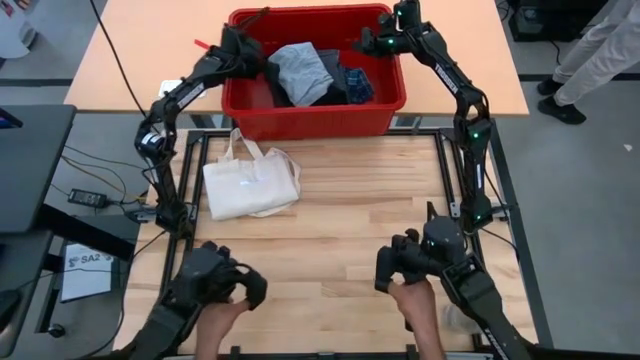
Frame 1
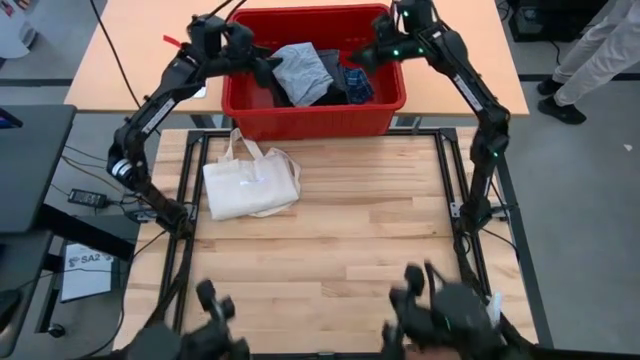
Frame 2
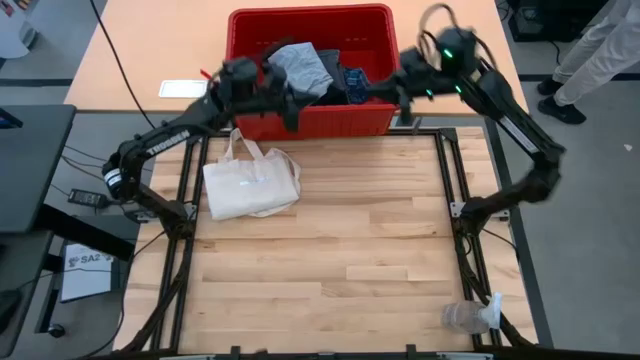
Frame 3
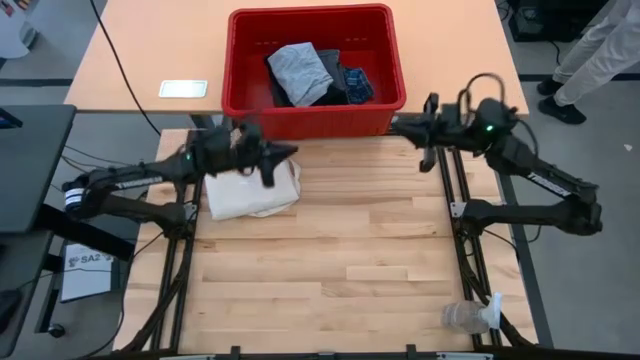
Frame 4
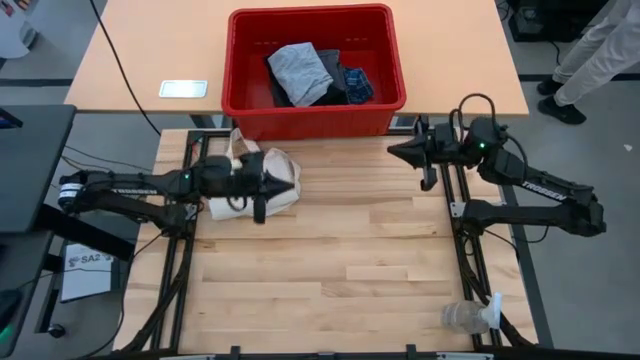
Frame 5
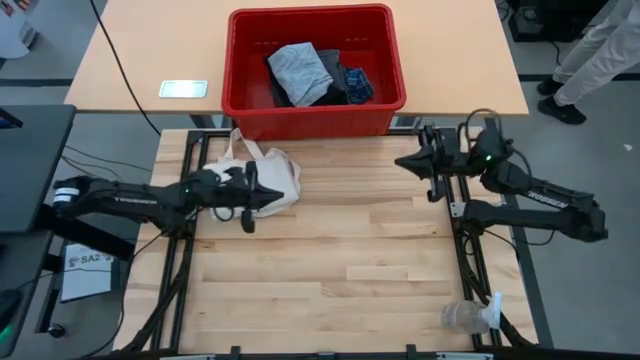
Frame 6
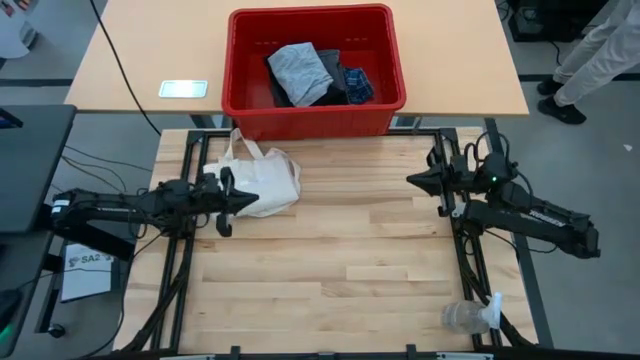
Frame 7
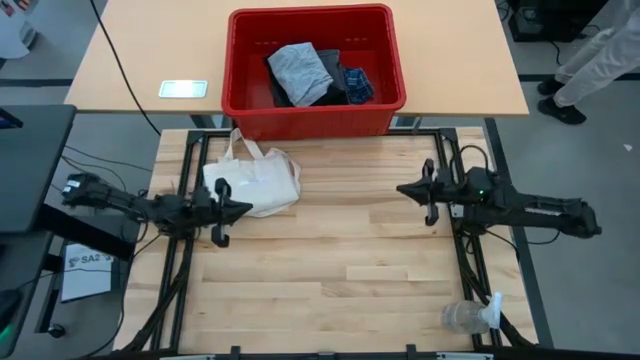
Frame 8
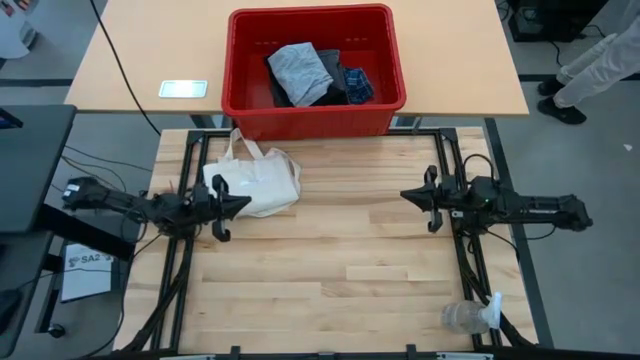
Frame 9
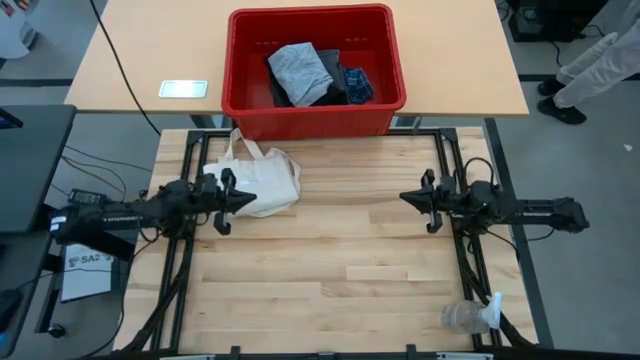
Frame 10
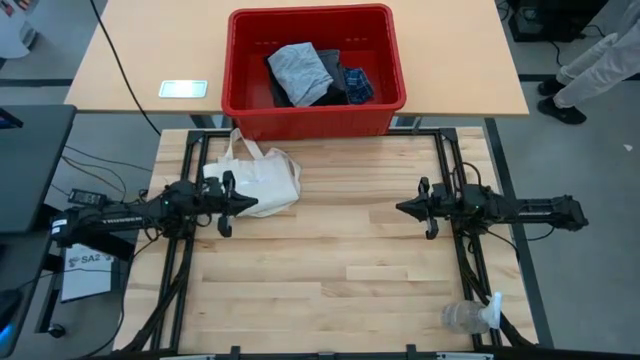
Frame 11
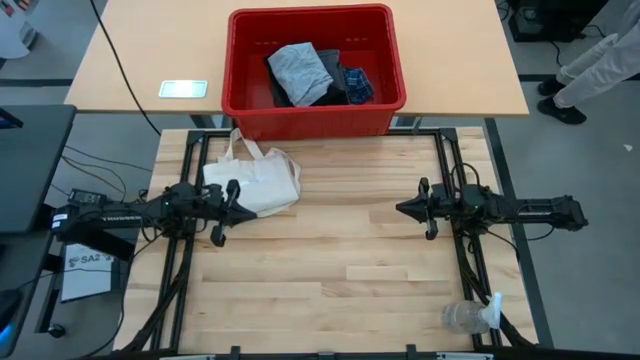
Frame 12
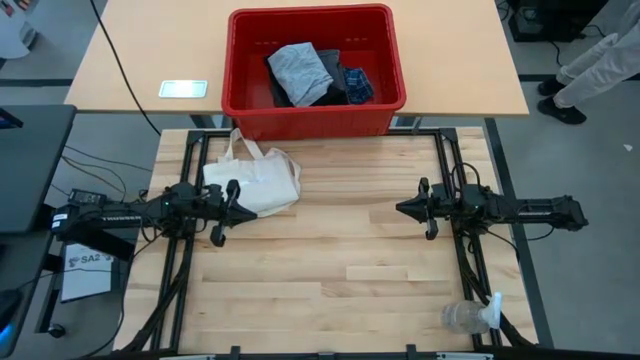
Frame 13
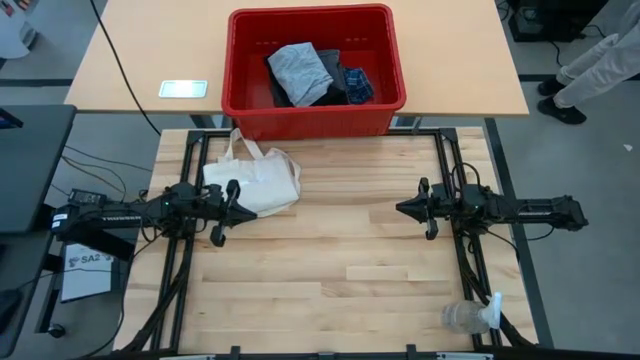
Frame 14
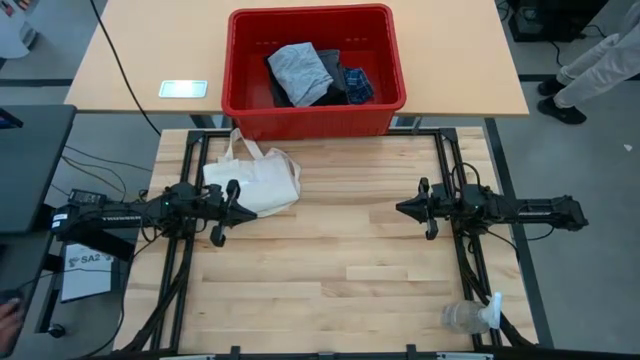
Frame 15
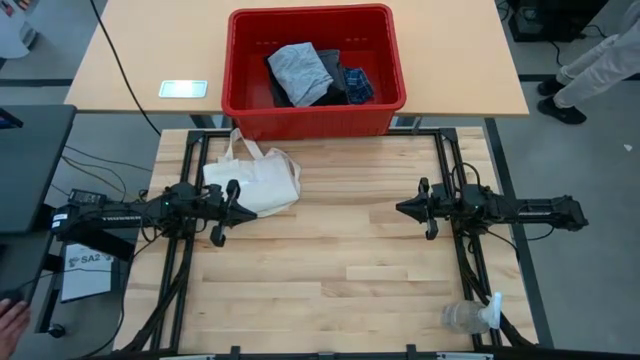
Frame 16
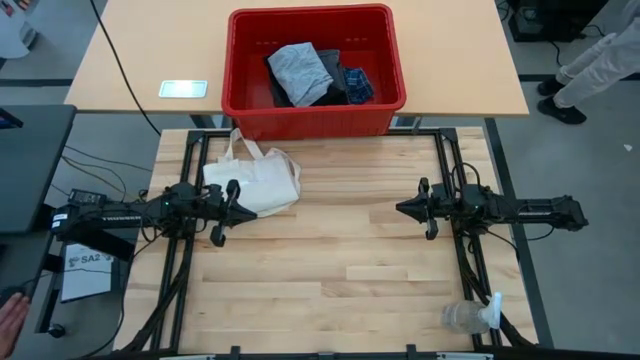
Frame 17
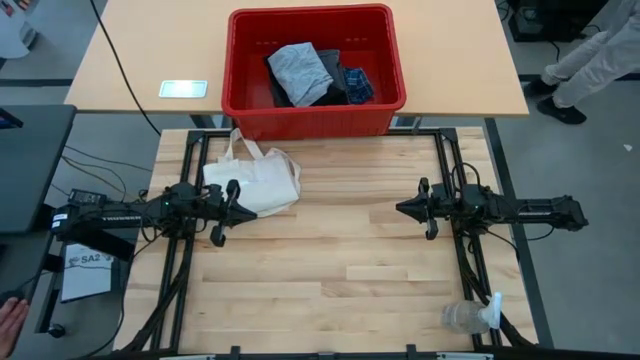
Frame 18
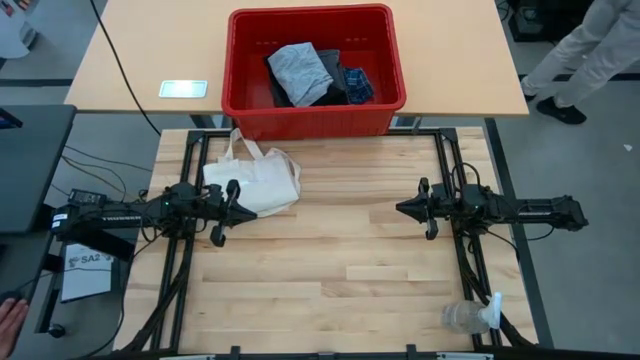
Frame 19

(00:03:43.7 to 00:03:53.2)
Task: Fold laundry
Return to Home Position

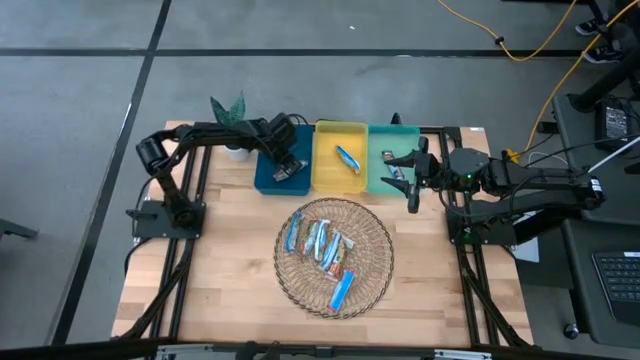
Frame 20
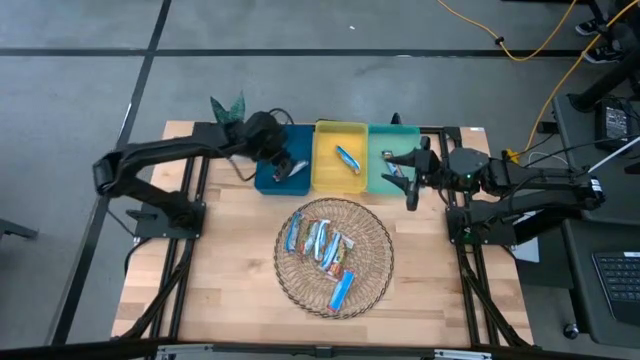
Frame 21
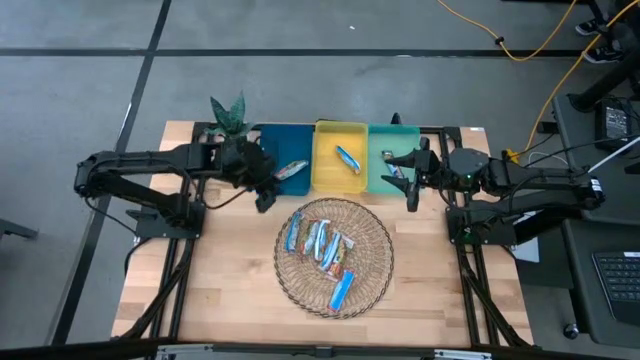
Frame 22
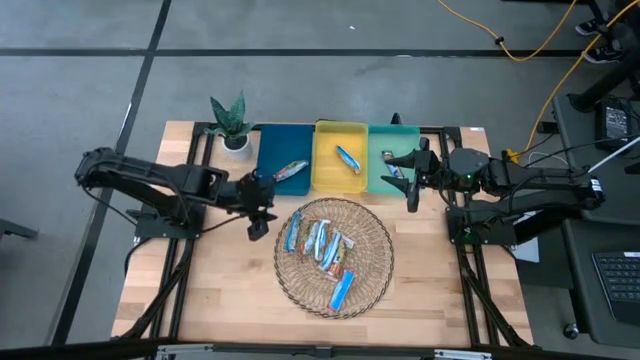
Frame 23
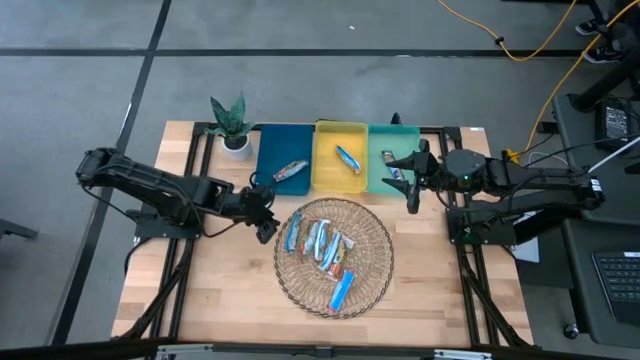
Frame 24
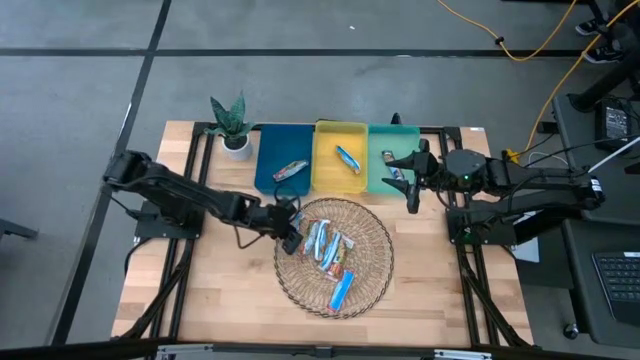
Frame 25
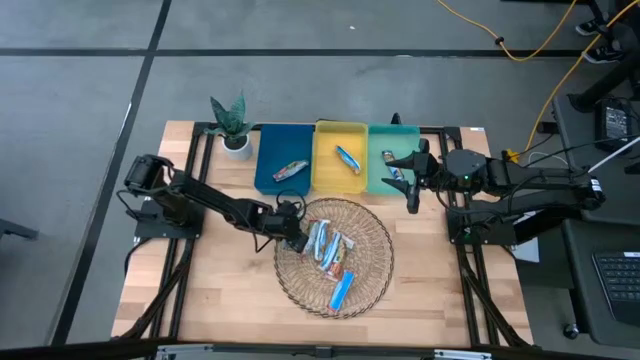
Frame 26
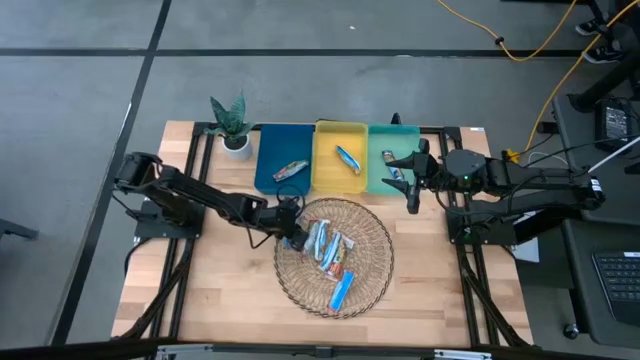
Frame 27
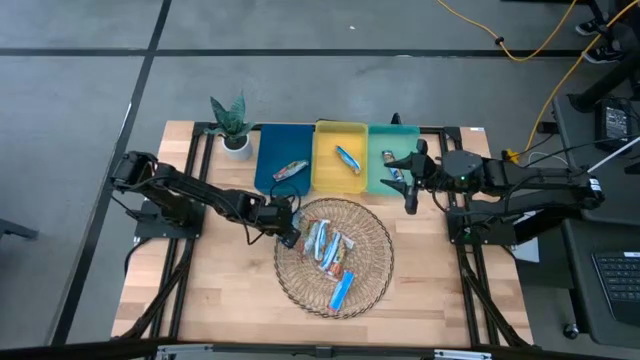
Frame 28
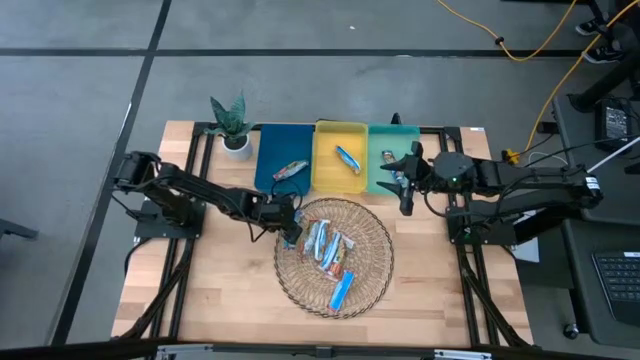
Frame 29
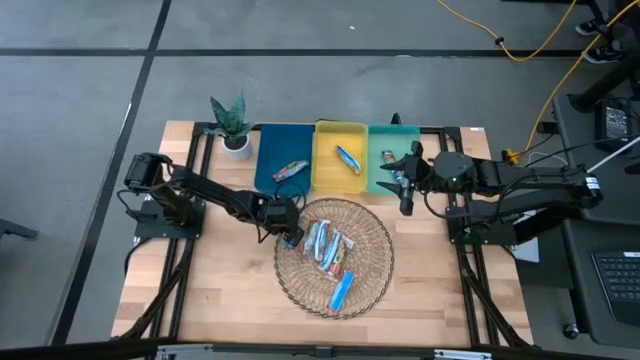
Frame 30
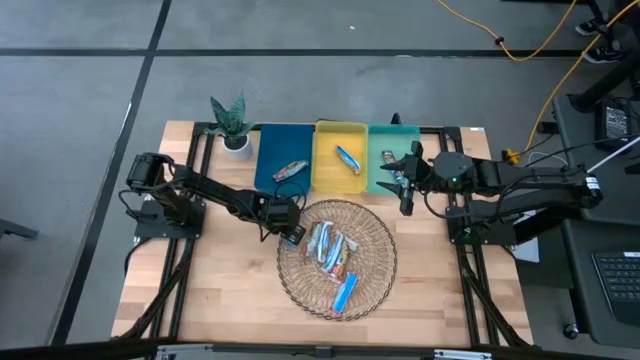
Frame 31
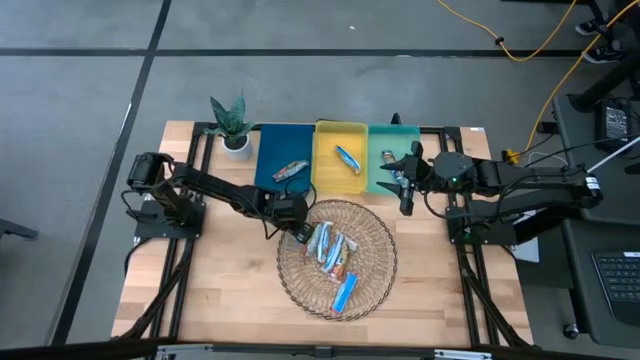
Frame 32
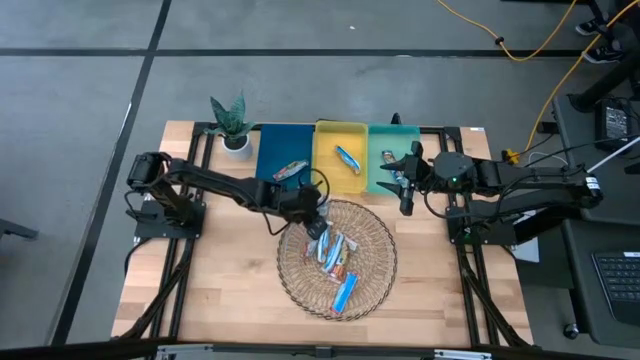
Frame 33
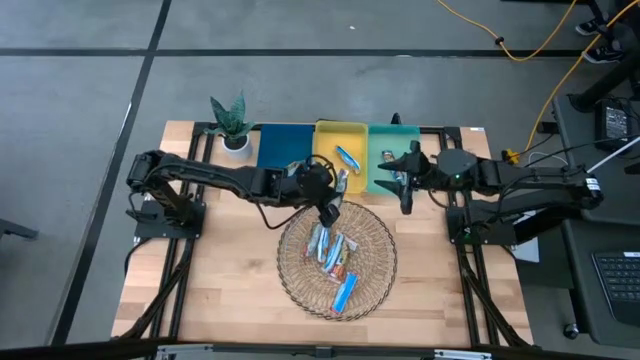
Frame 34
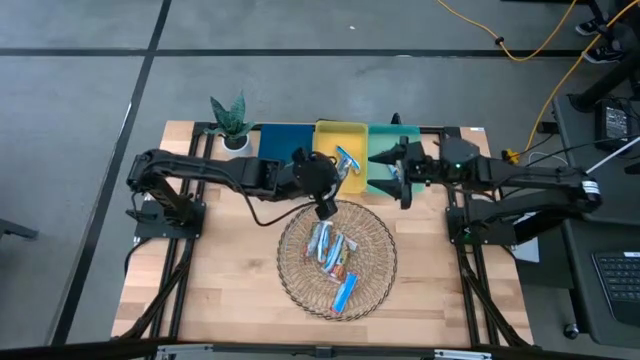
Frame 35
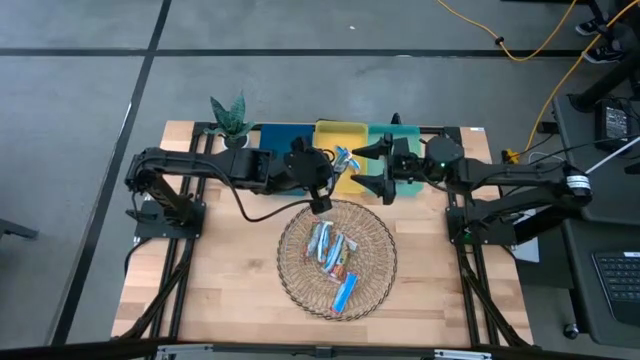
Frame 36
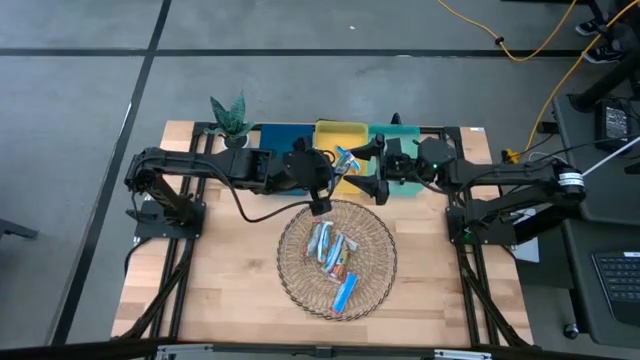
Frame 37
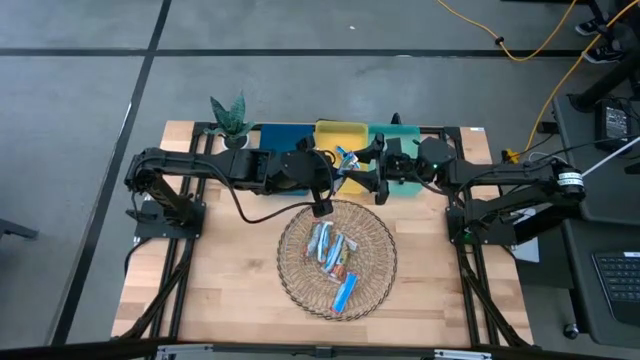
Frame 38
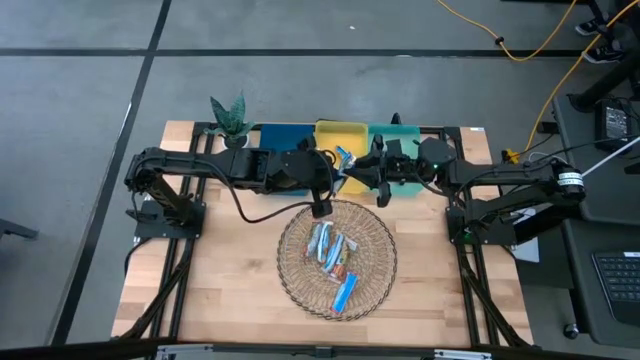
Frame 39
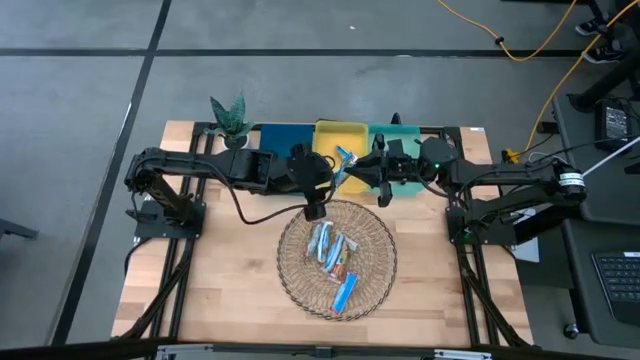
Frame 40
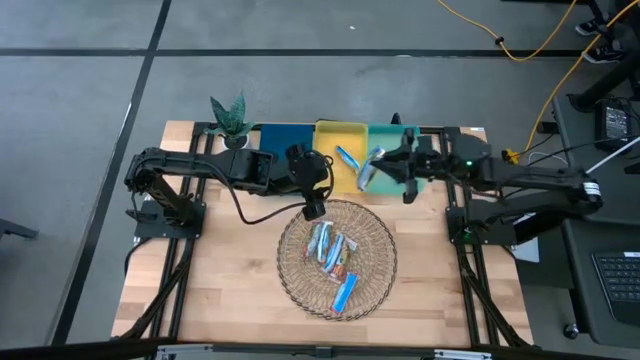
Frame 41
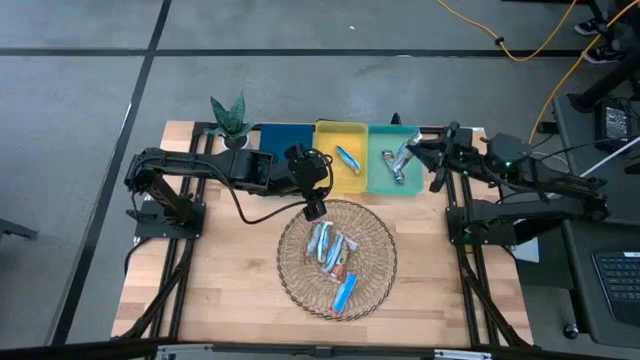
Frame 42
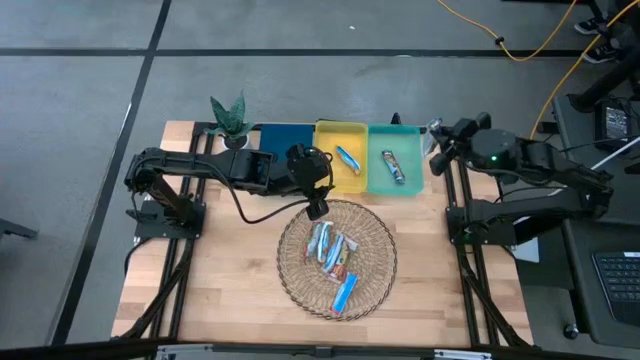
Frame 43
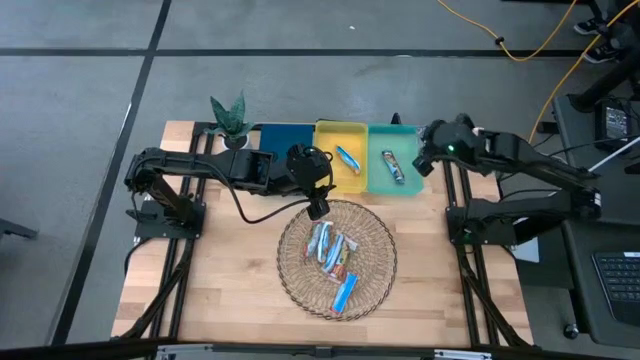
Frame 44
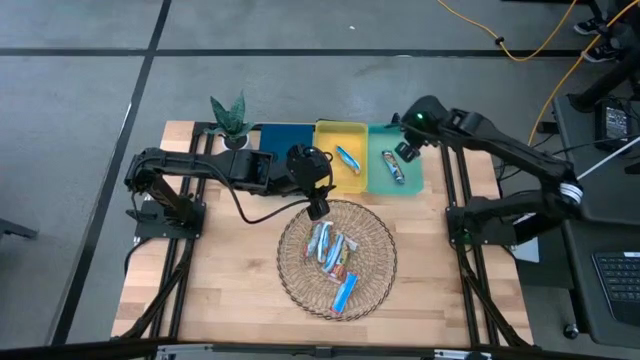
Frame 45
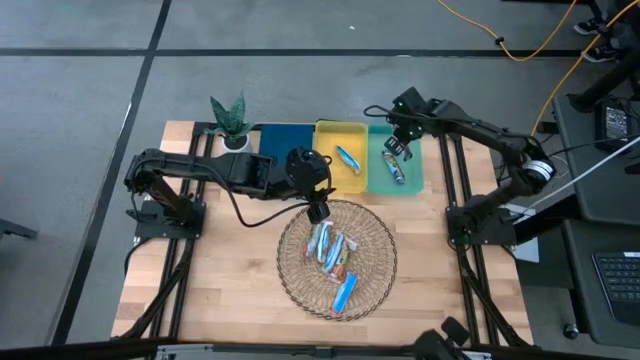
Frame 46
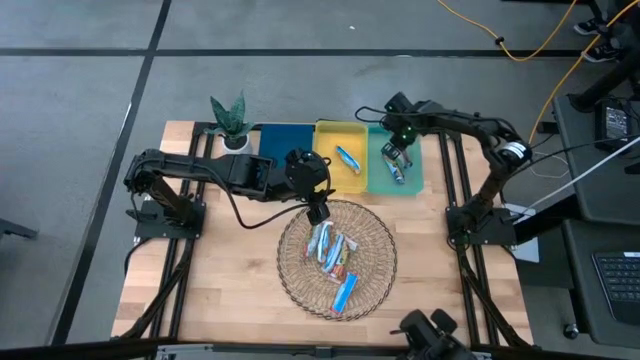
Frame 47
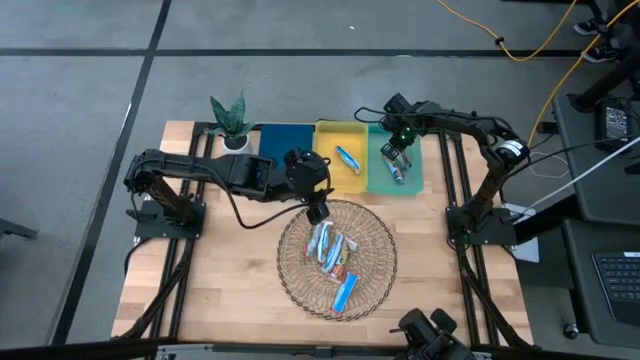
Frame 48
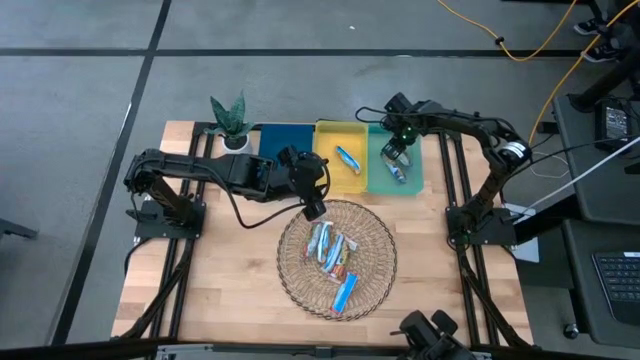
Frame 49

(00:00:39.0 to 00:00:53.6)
Task: Pick and place Granola Bars by type
Put the blue granola bar into the light blue bin
